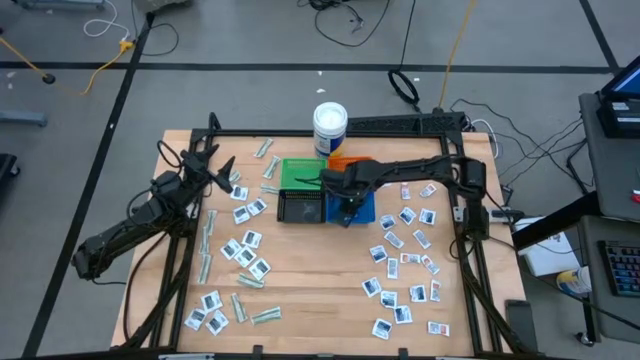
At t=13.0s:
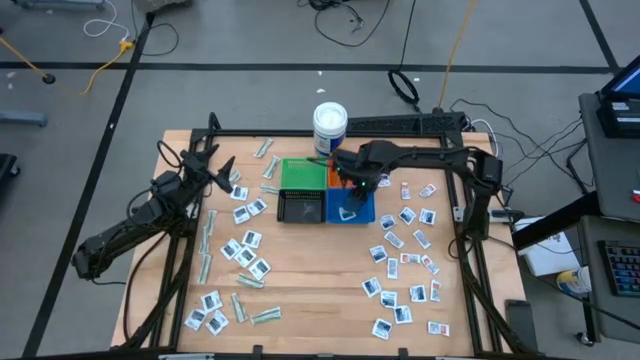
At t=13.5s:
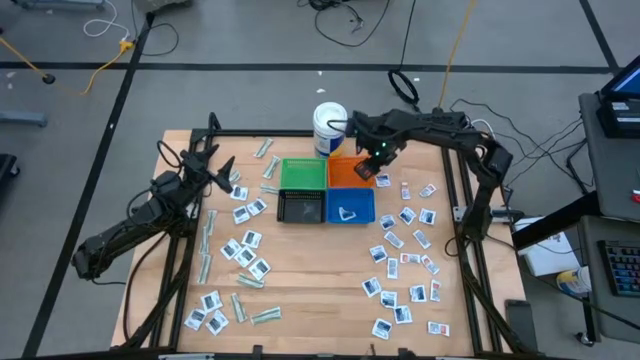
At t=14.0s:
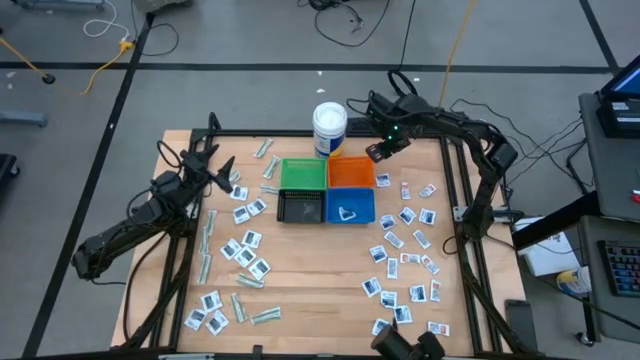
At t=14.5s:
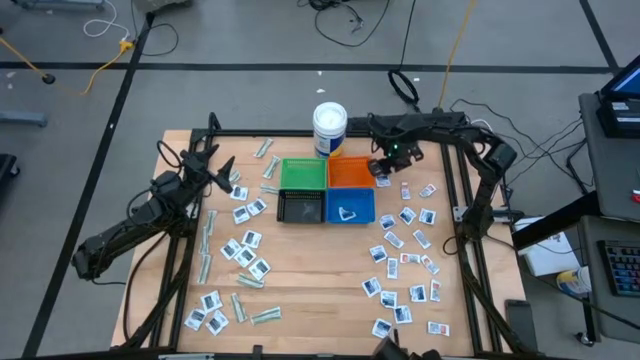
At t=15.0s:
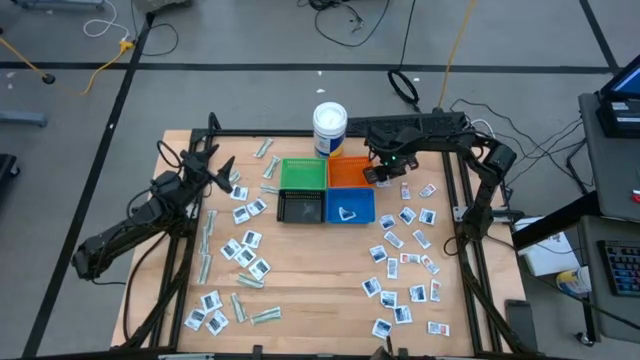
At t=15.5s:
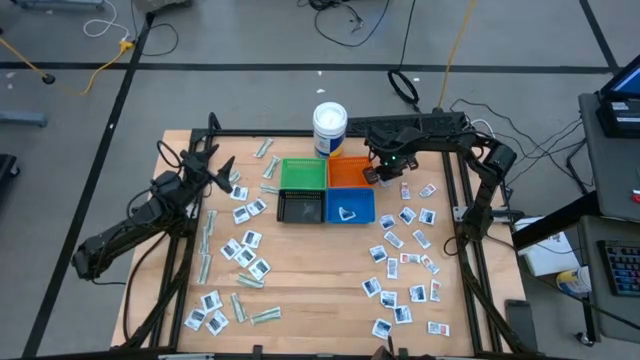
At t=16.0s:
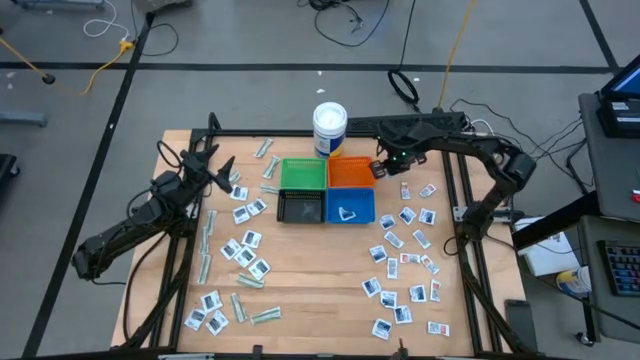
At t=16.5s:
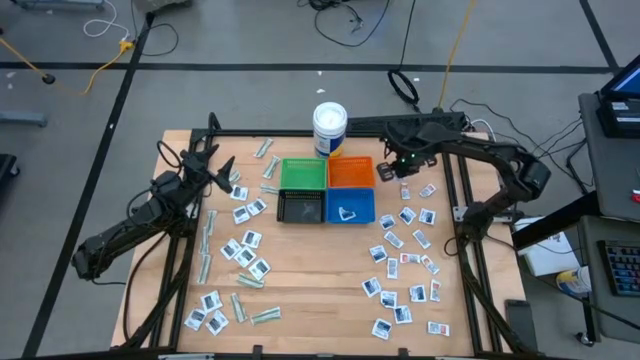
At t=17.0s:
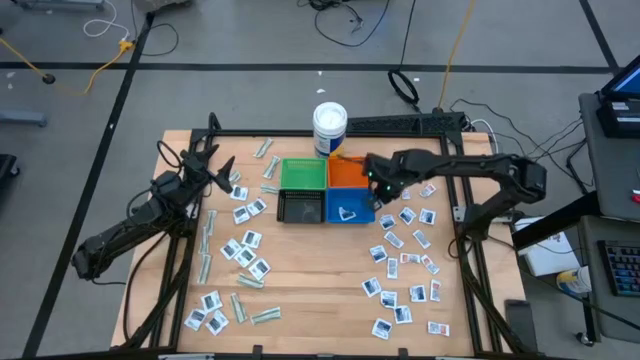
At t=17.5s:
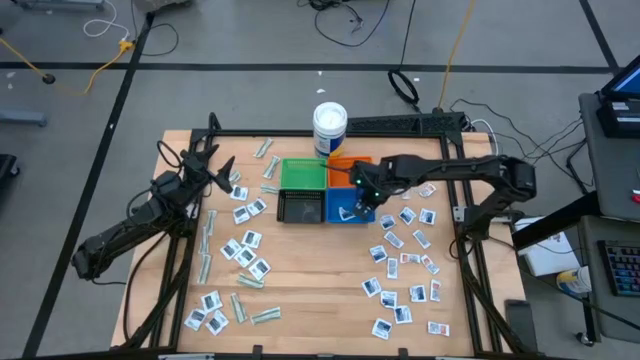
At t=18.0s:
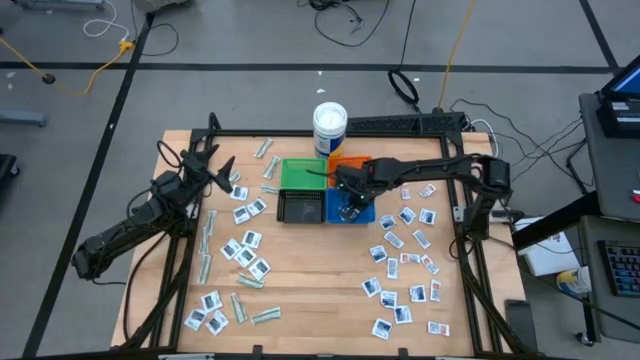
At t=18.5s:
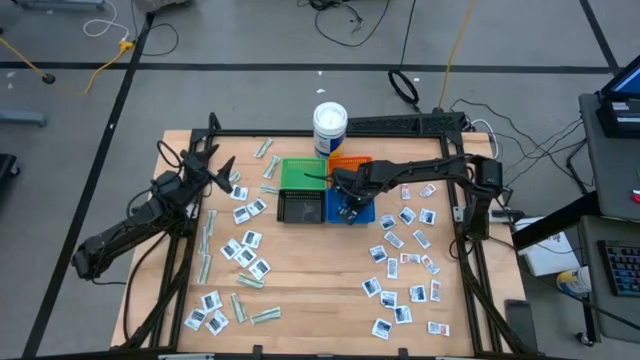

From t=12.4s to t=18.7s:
Task: Pick & Place First Aid Supplies
Put the blue alcohol pad into the blue basket

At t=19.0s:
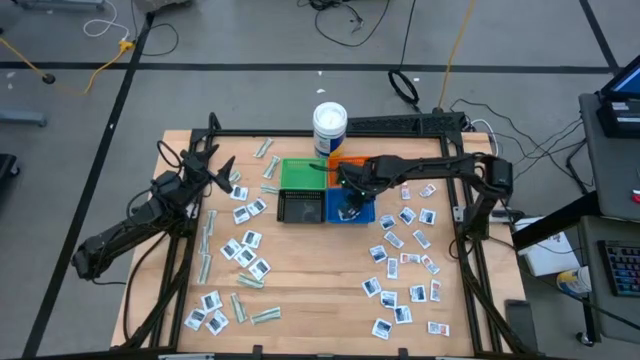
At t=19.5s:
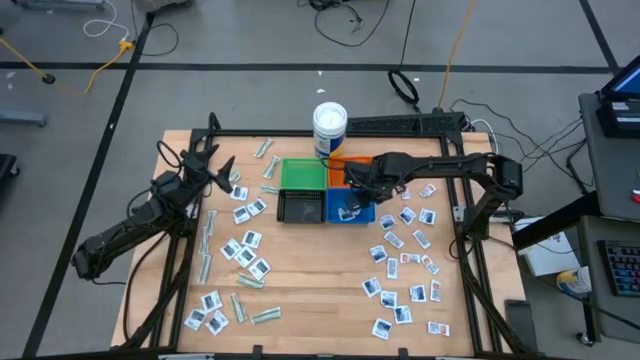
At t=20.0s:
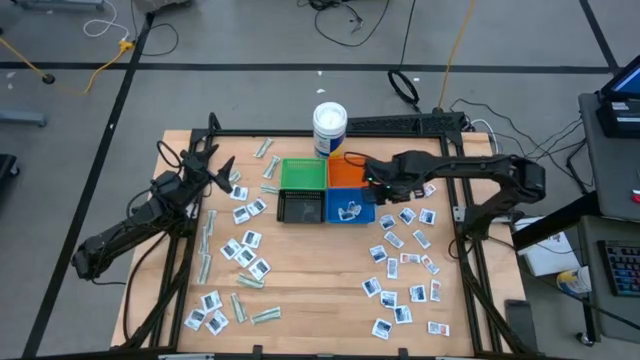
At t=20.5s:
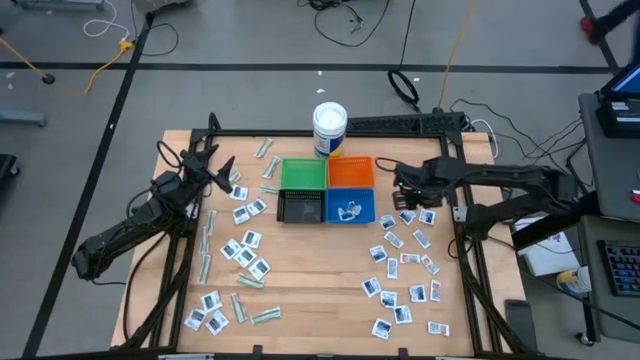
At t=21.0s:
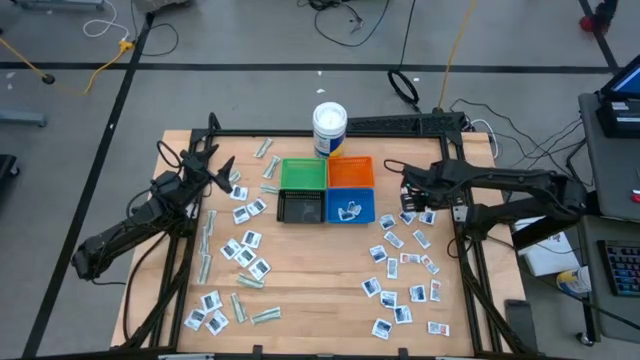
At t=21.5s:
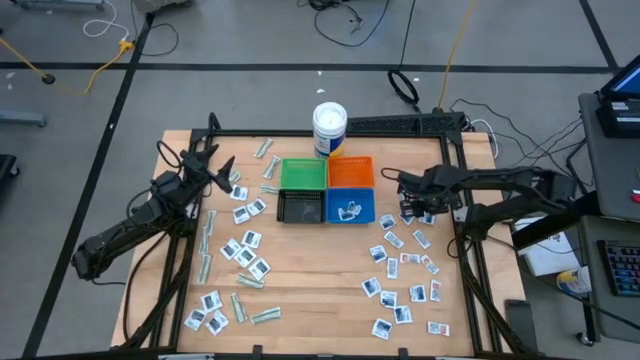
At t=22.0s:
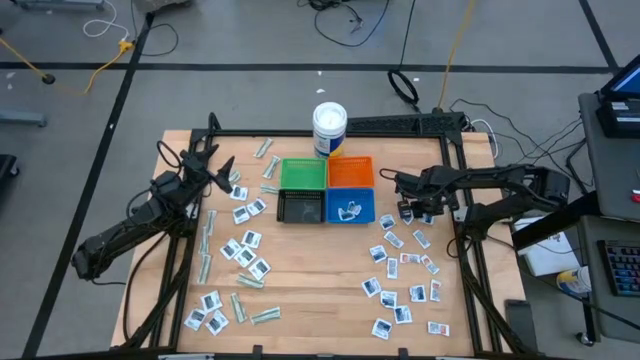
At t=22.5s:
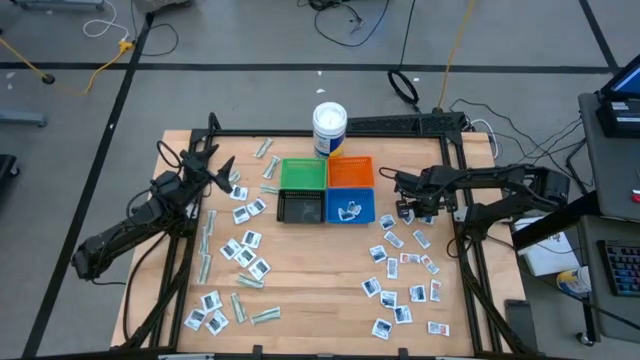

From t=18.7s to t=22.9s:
Put the blue alcohol pad into the blue basket

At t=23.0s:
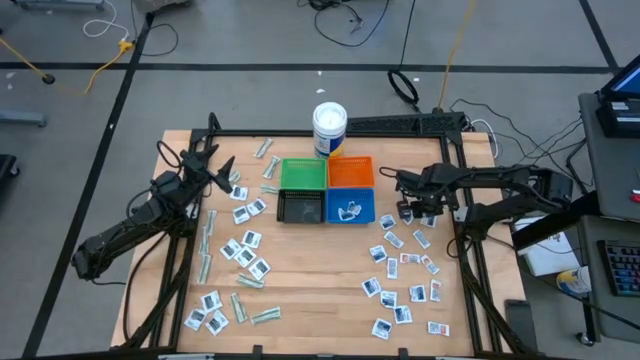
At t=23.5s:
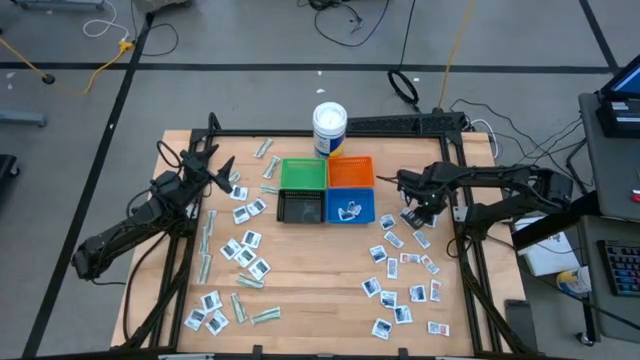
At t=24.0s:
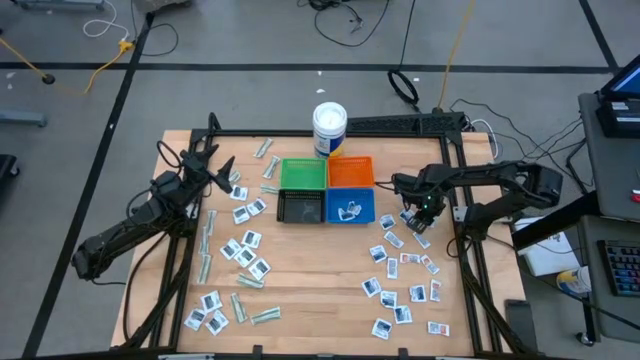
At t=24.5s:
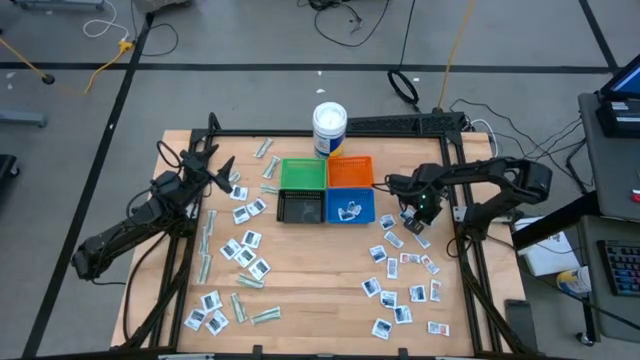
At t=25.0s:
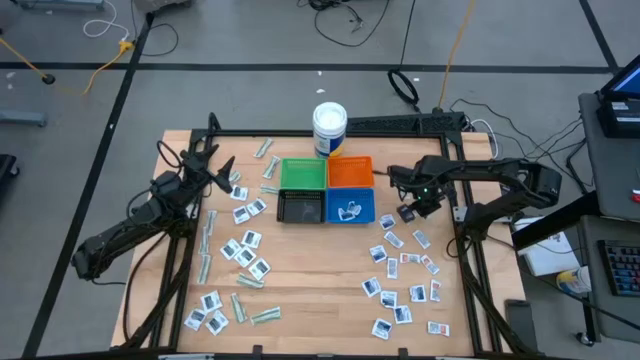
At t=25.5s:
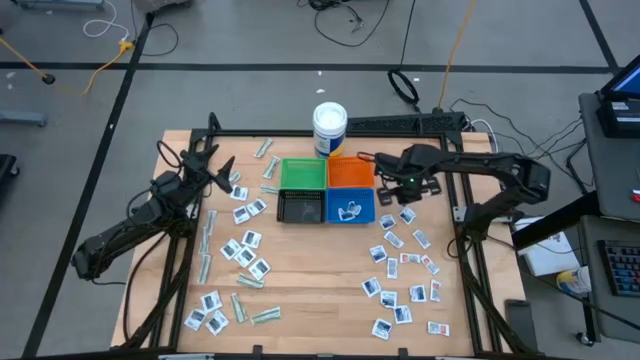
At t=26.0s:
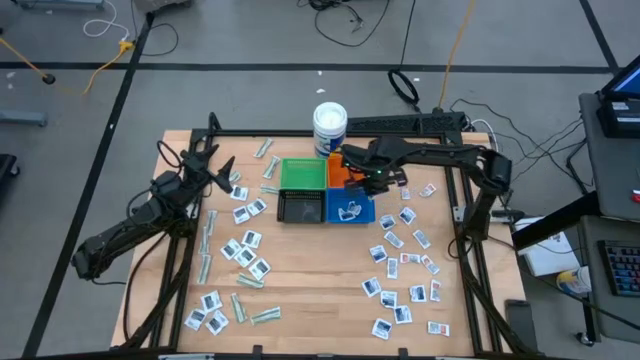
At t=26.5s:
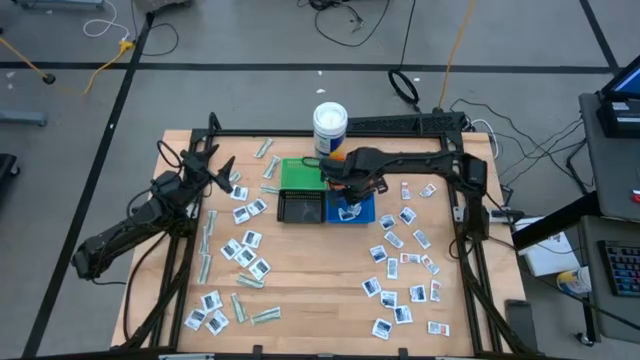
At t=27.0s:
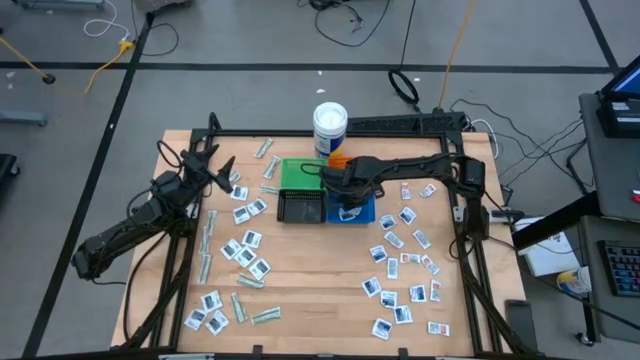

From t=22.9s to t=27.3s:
Put the blue alcohol pad into the blue basket

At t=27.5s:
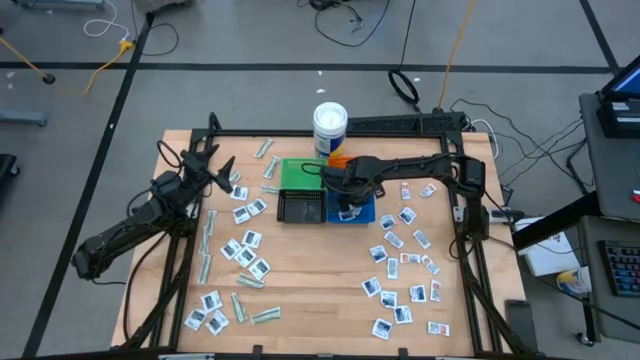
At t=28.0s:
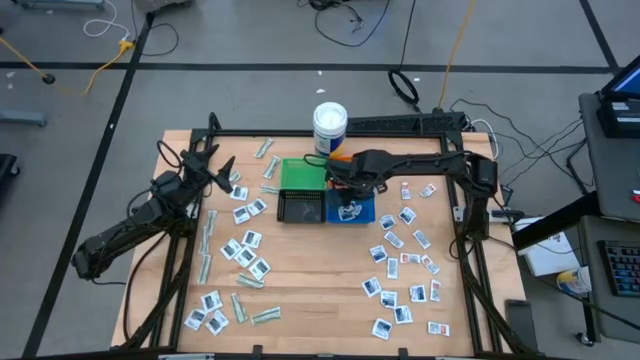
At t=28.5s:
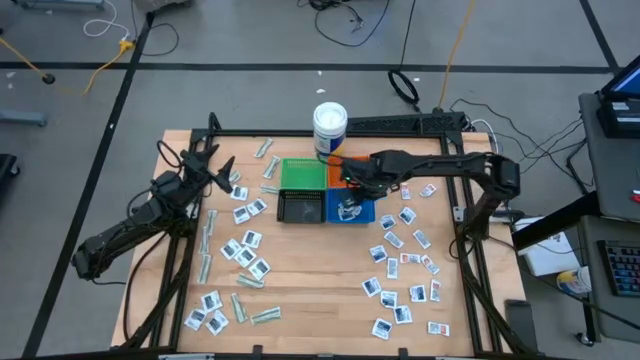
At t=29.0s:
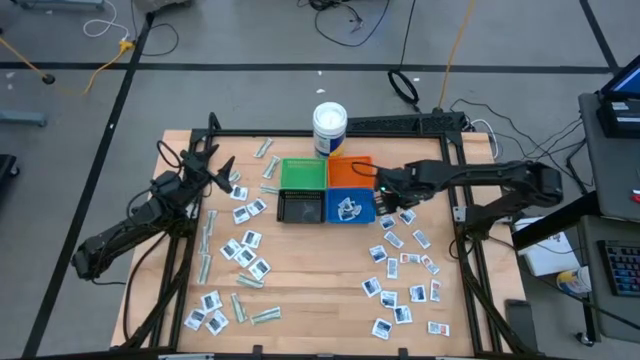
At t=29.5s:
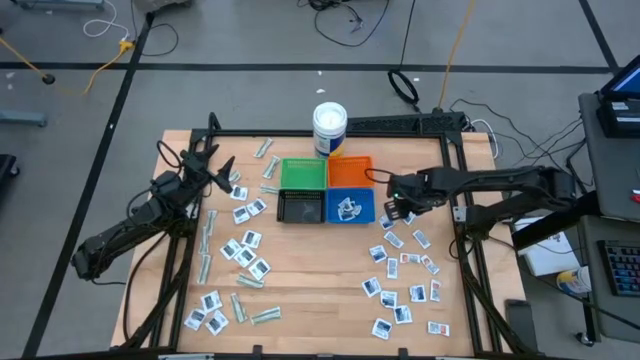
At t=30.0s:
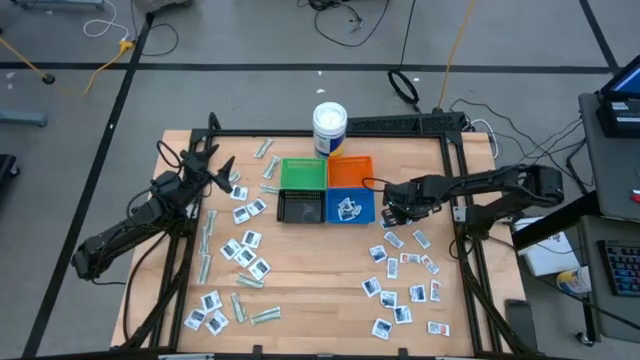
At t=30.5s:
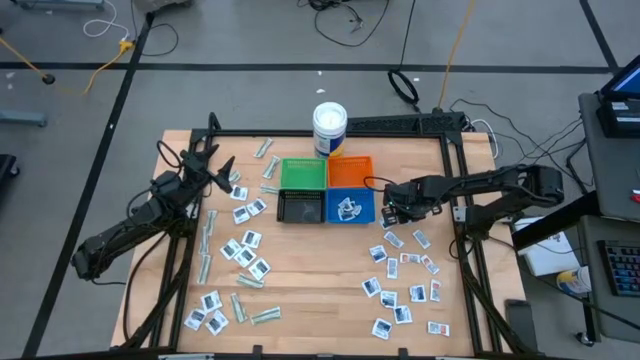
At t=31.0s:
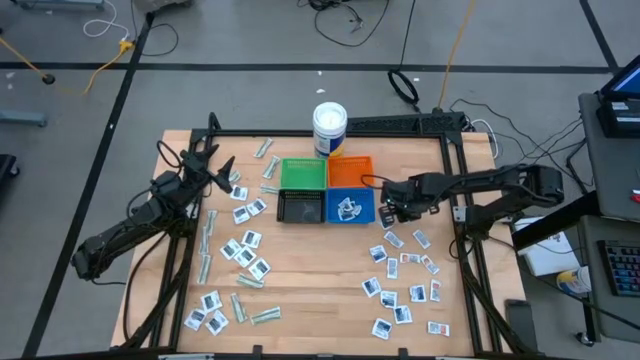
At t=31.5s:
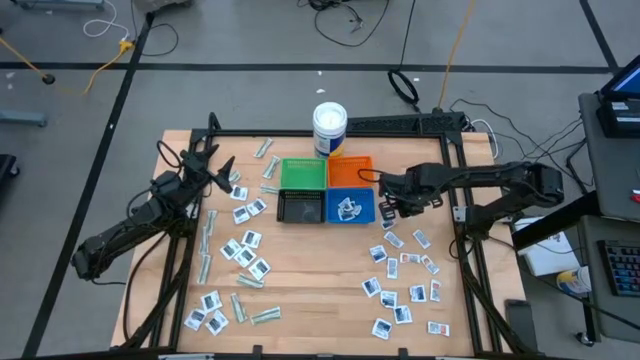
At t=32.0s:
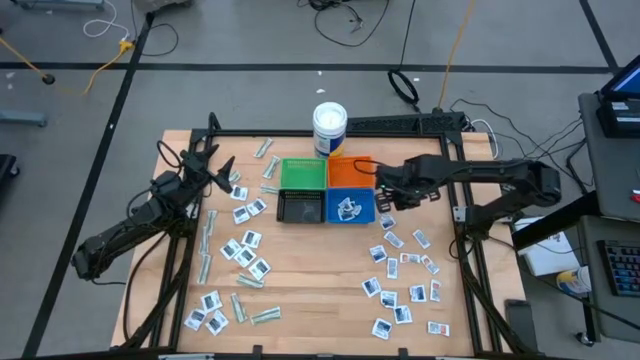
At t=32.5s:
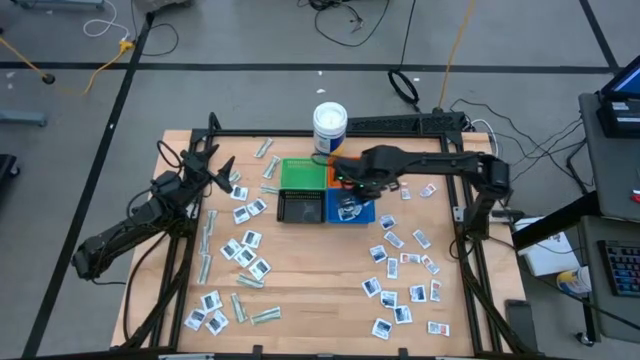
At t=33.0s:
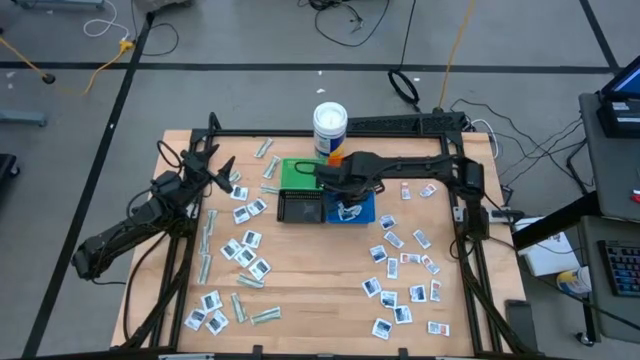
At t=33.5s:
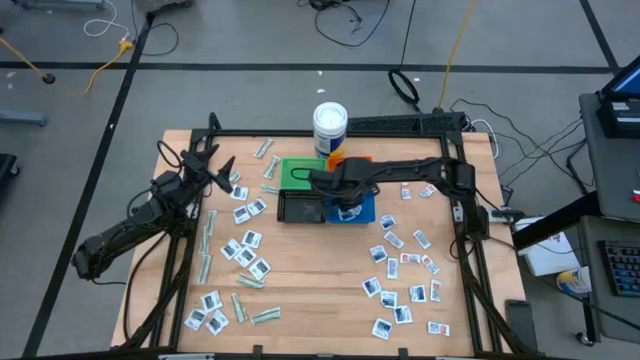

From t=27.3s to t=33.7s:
Put the blue alcohol pad into the blue basket
